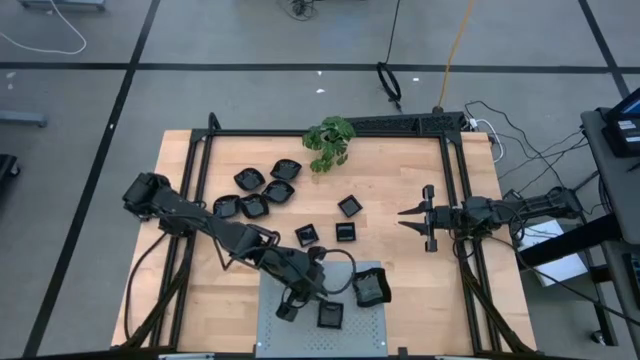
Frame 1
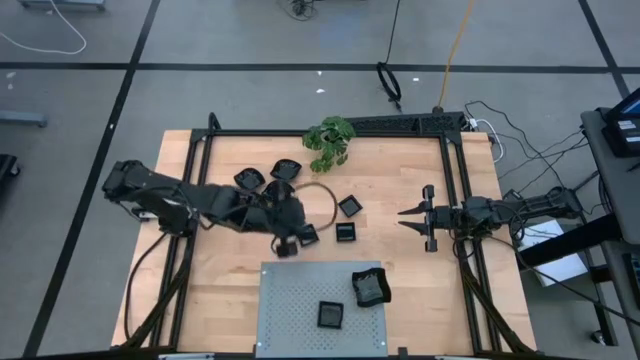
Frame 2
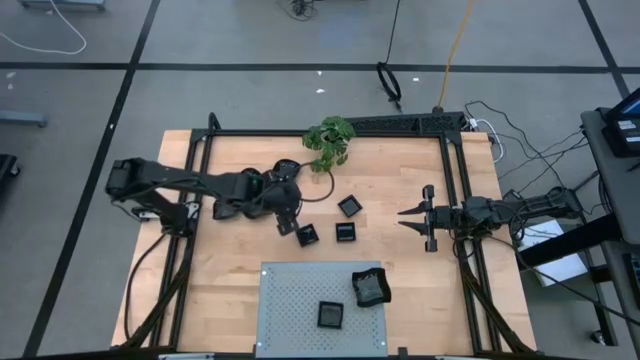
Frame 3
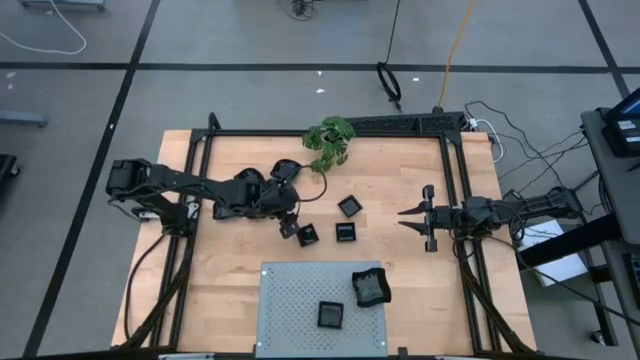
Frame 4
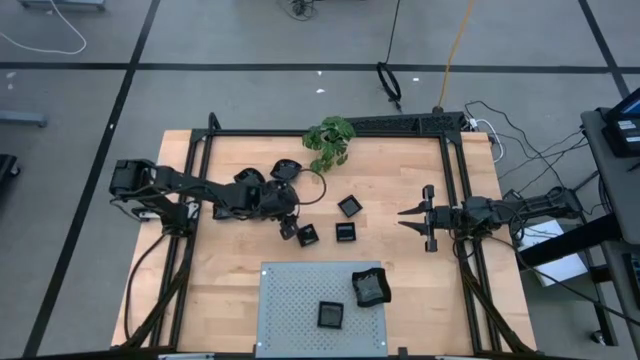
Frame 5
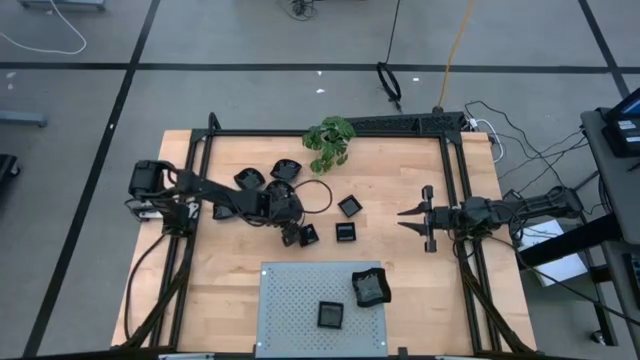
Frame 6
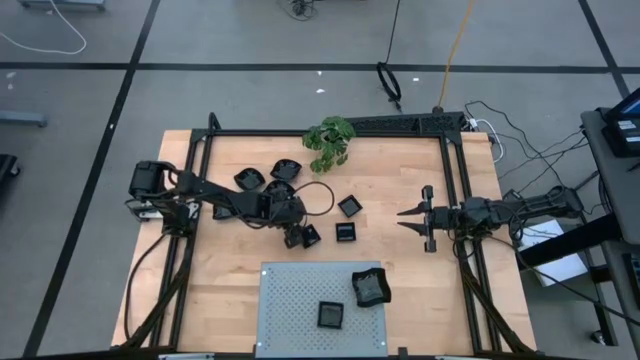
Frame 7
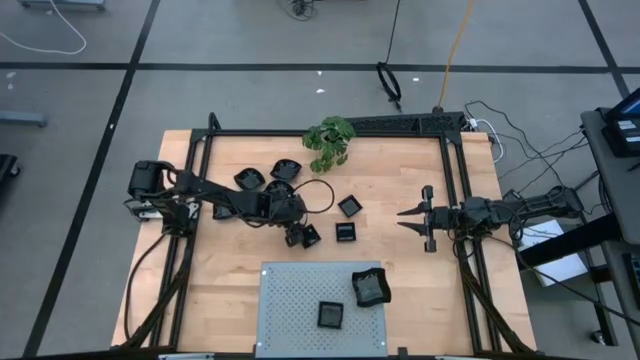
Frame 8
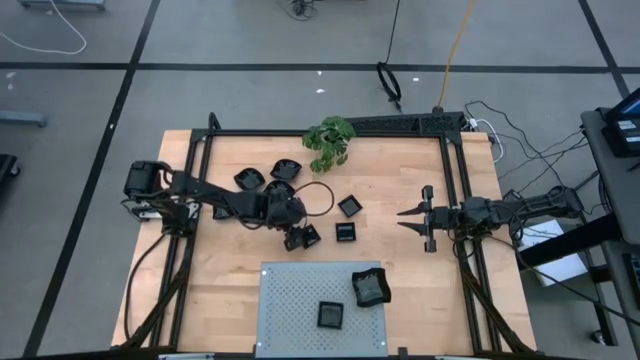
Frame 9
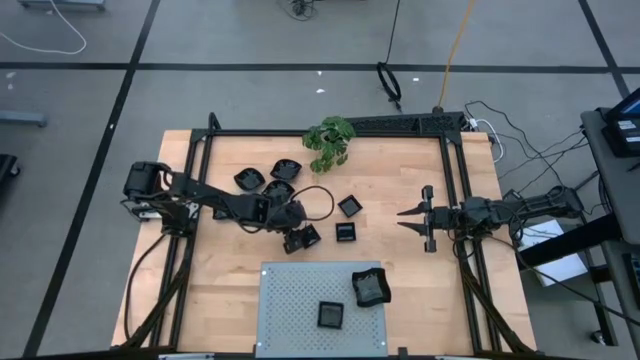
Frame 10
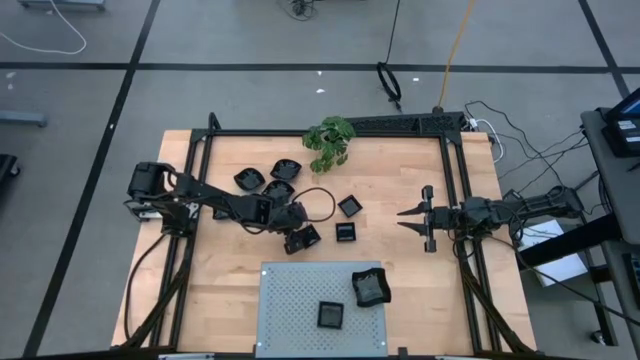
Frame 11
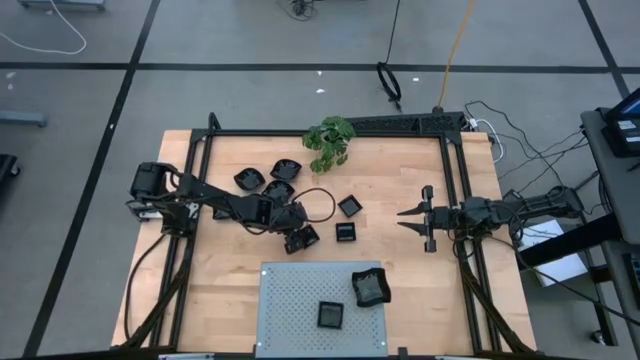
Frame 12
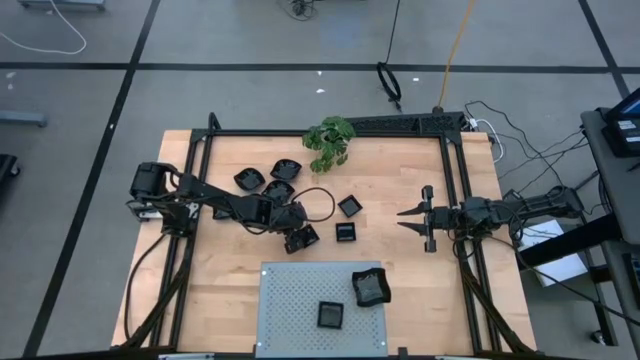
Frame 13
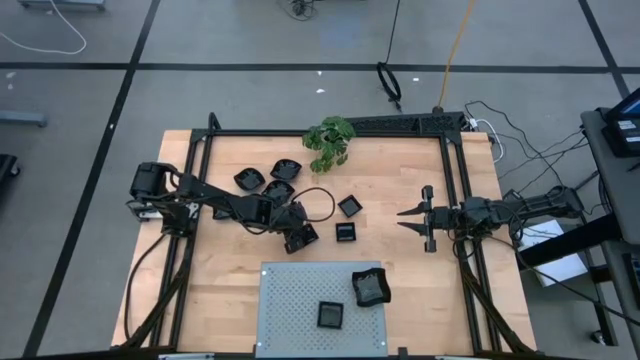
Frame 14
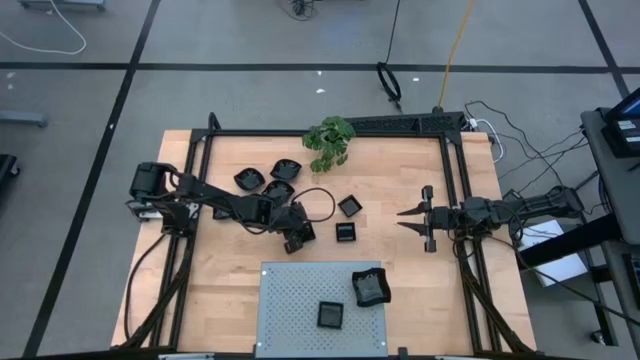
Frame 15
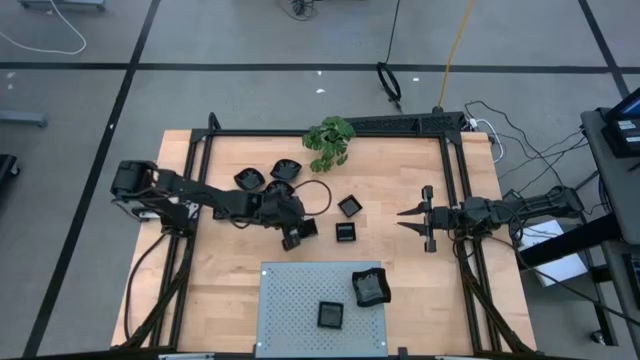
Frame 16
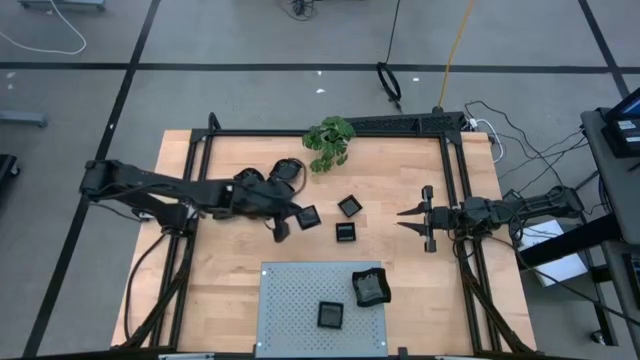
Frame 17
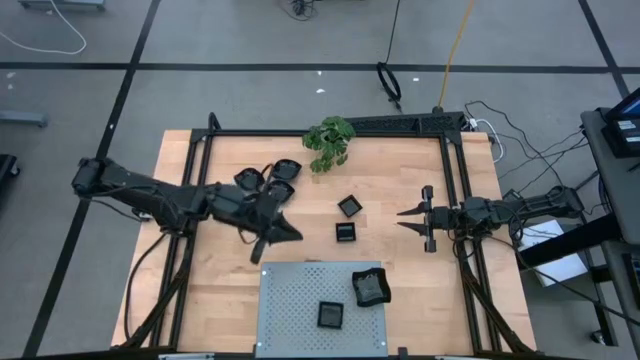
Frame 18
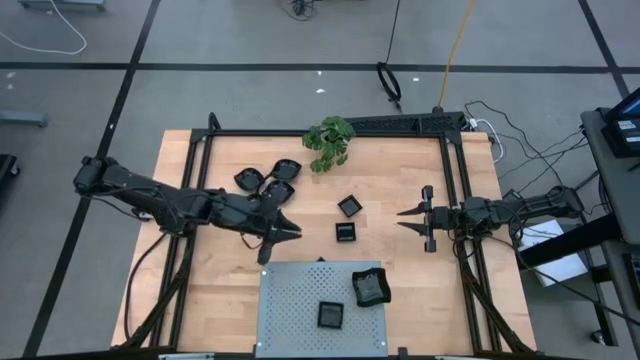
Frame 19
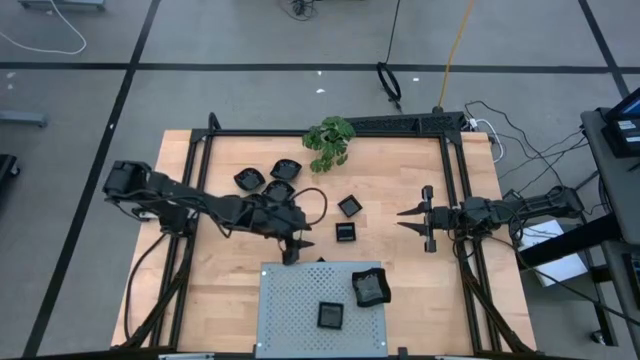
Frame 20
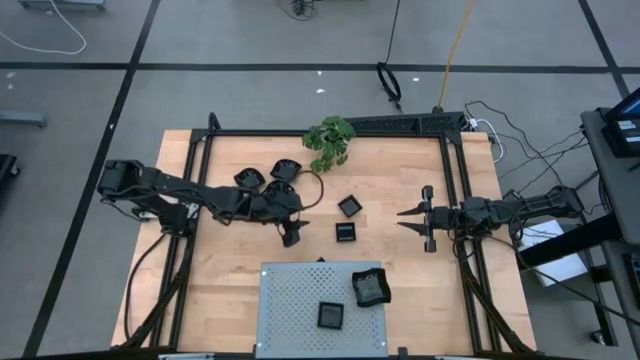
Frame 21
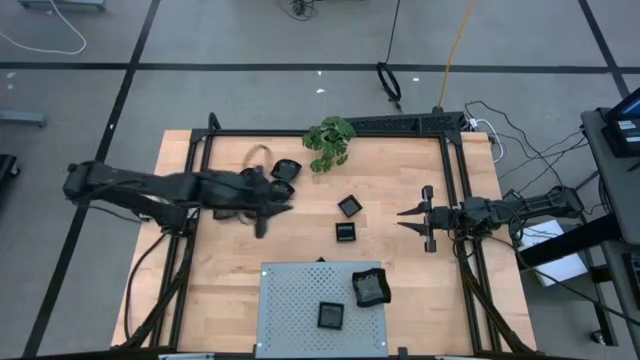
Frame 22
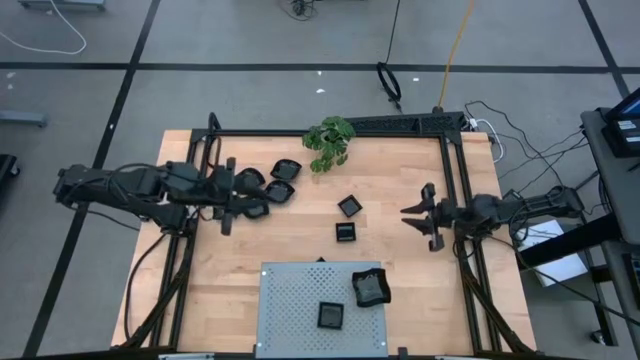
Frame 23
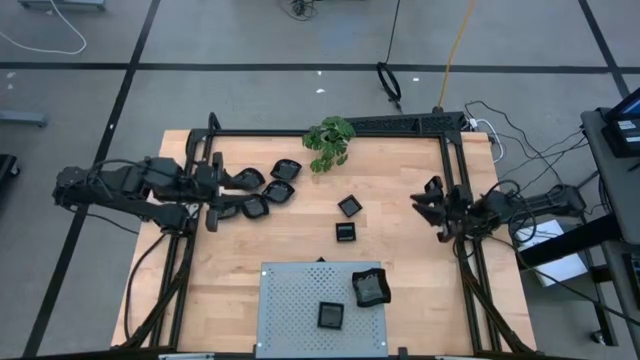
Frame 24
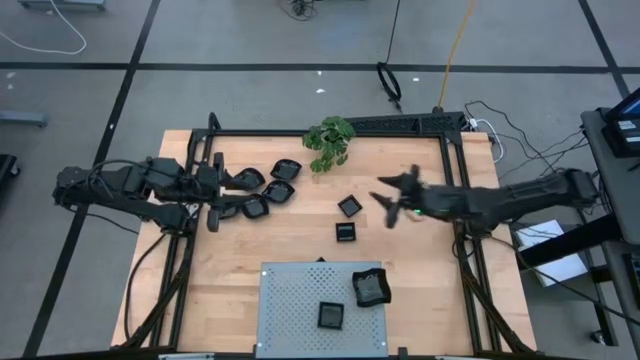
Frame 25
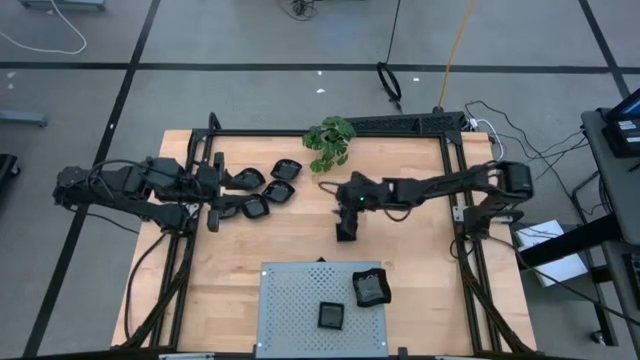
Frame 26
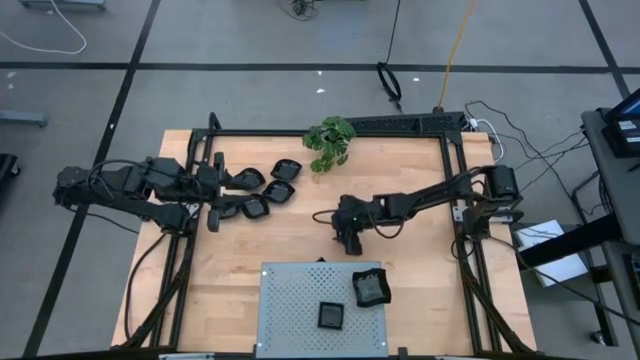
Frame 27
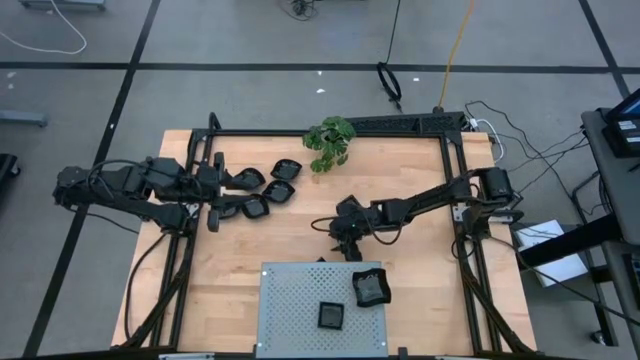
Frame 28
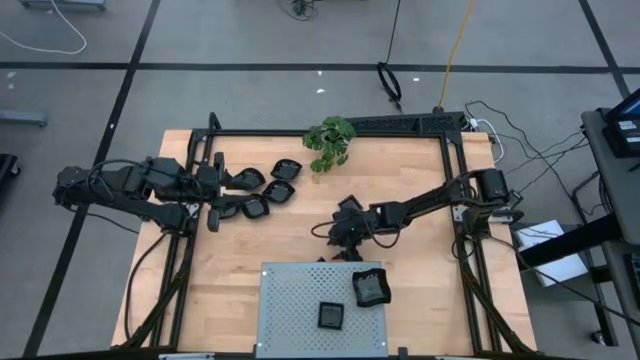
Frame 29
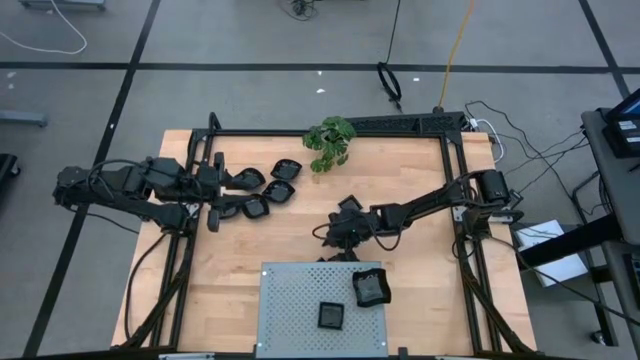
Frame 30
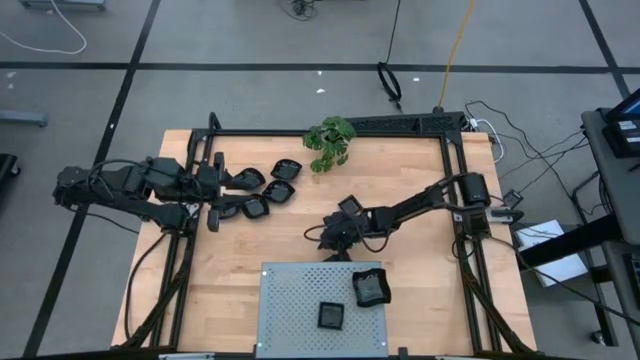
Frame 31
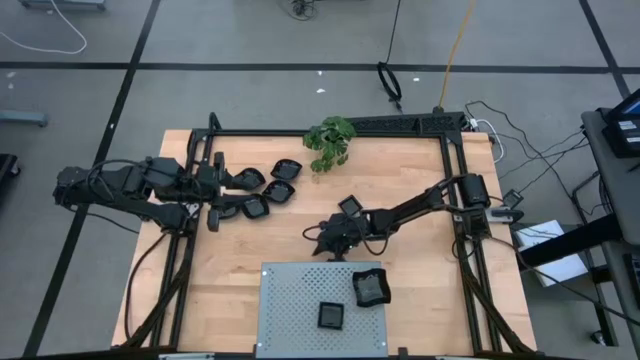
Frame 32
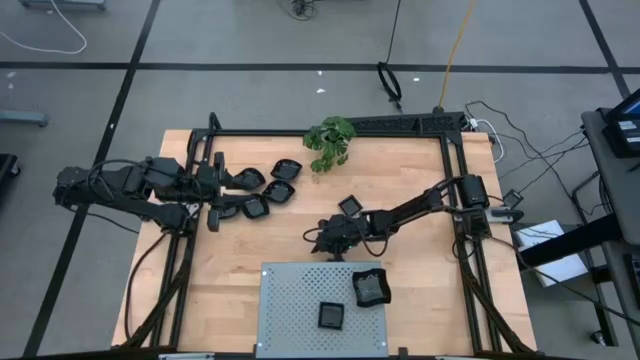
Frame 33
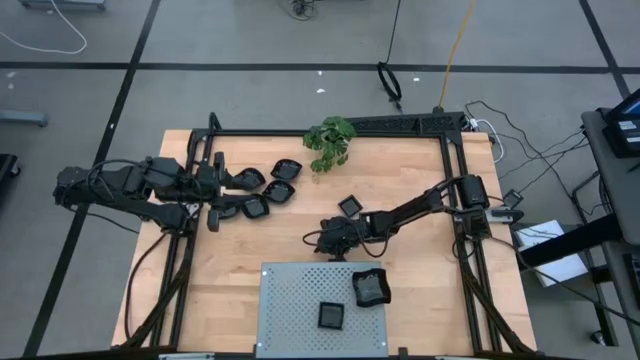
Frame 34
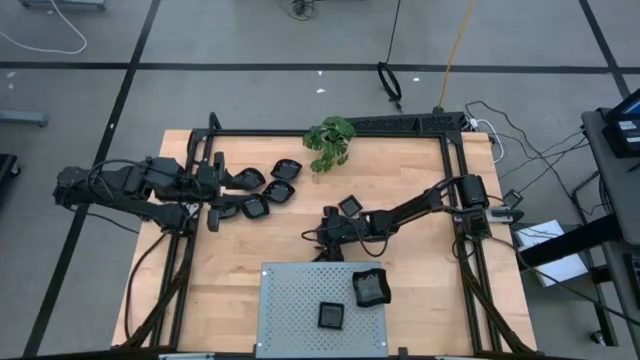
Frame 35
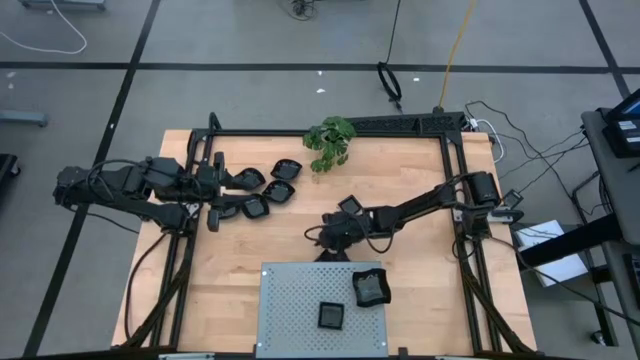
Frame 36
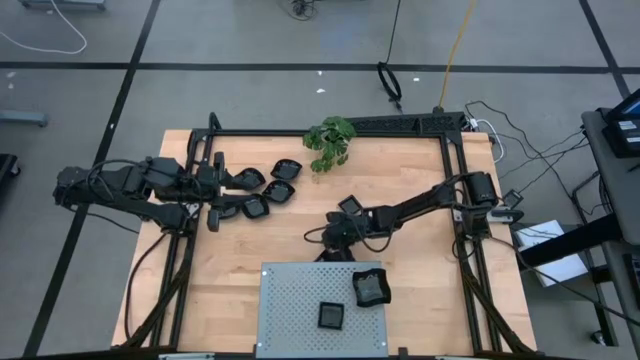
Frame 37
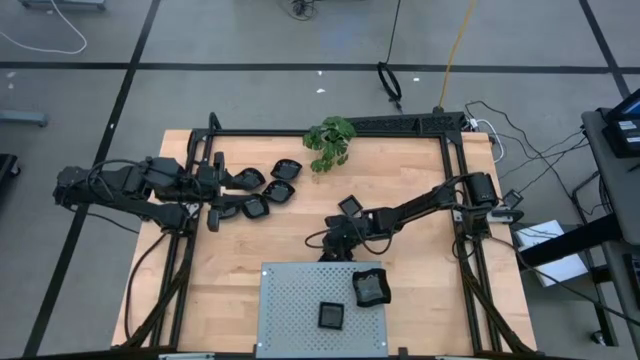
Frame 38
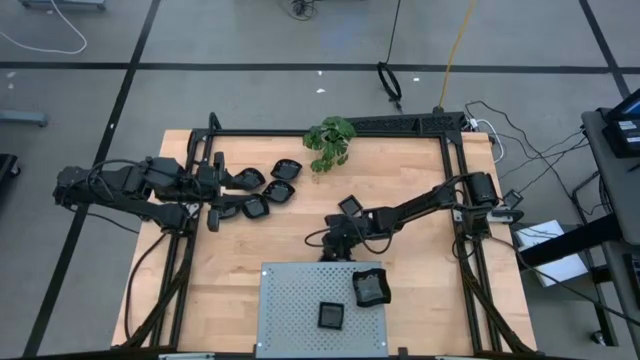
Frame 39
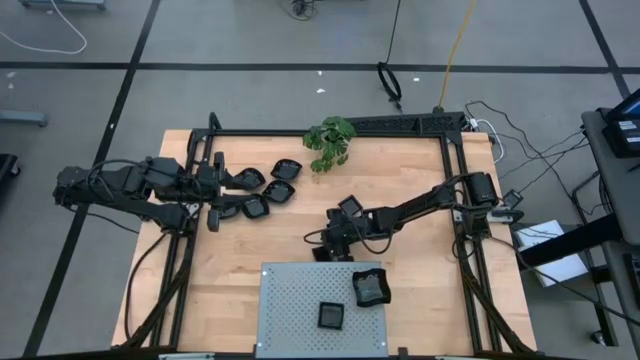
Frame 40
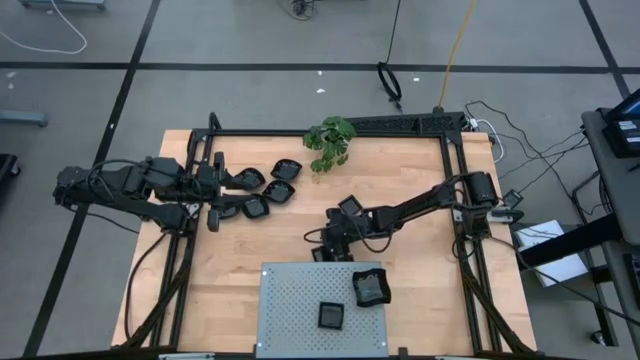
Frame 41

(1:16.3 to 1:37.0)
Task: Pick & Place Mini shaped plates
Stack the square plate onto the stacked square plate on the shelf

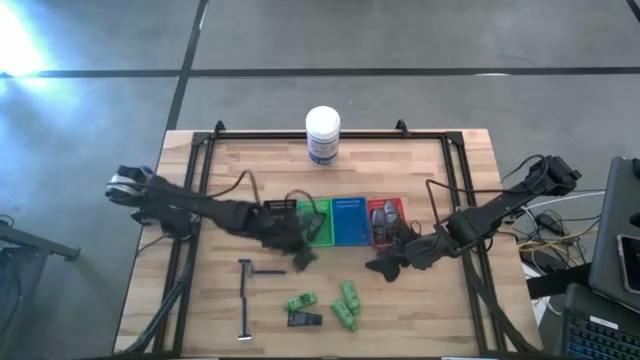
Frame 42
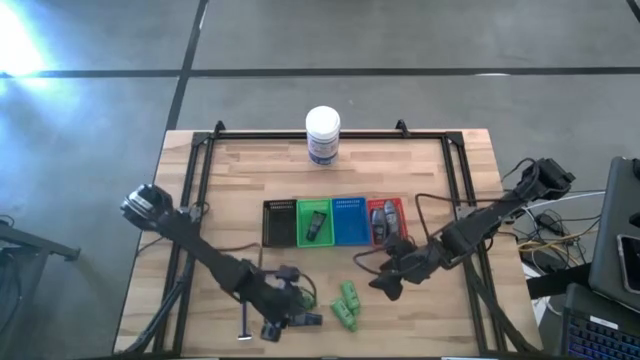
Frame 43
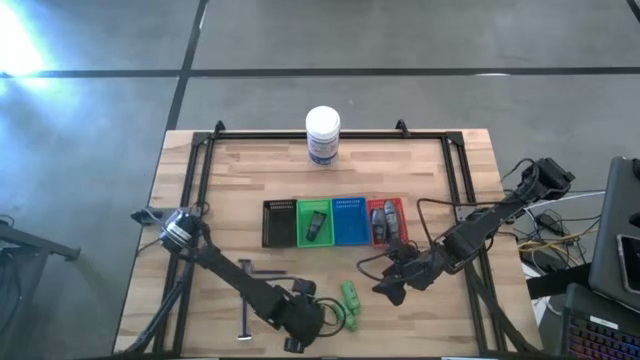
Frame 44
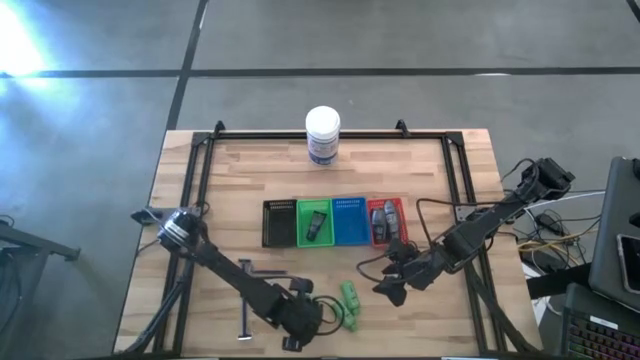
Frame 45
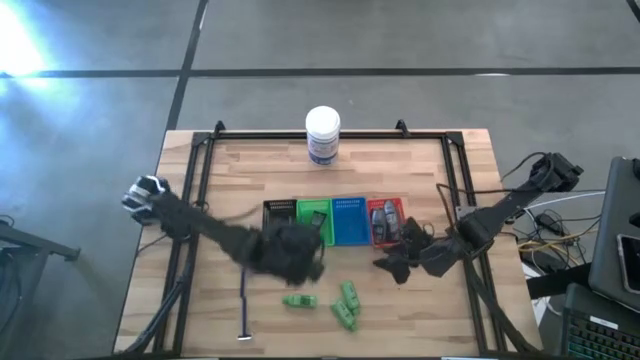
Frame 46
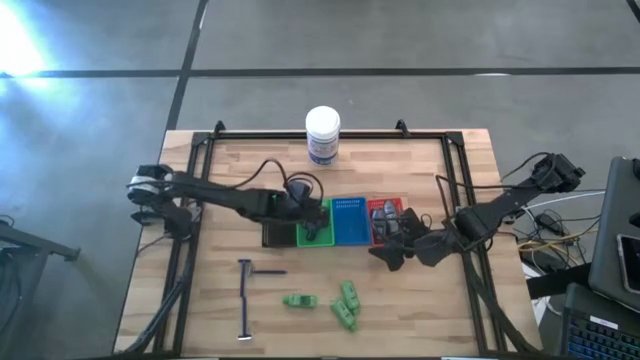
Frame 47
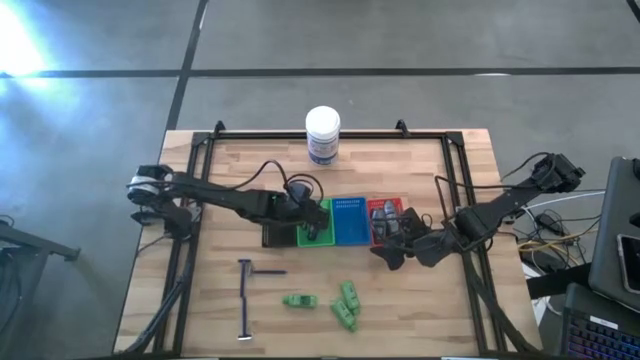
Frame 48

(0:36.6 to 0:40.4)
Task: Pick & Place Travel size toiletries
Put the blue shave cream into the green bin
